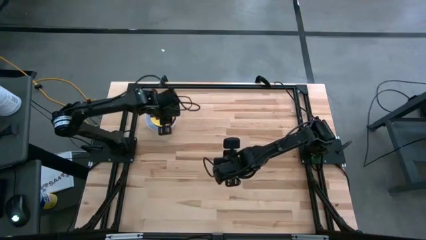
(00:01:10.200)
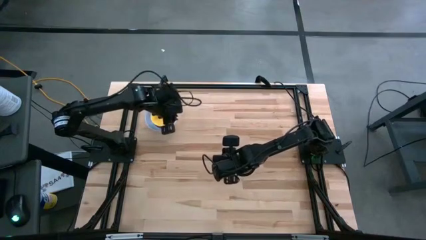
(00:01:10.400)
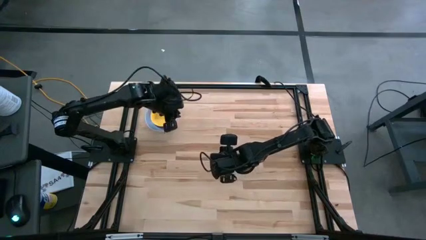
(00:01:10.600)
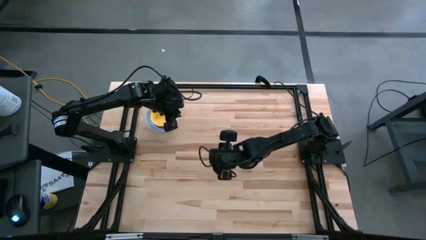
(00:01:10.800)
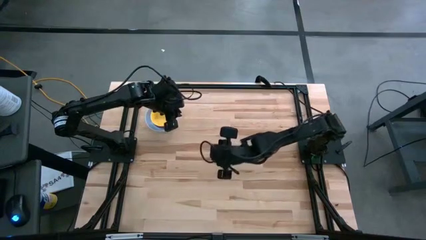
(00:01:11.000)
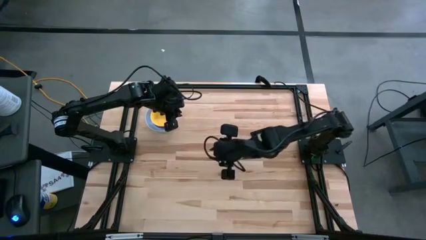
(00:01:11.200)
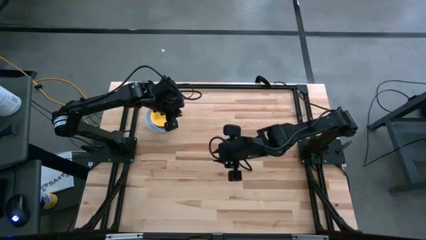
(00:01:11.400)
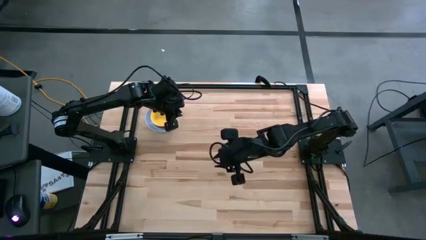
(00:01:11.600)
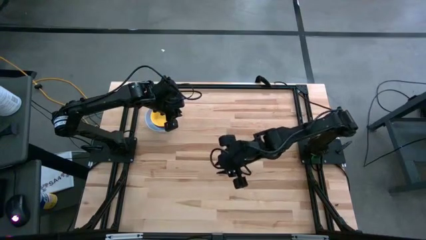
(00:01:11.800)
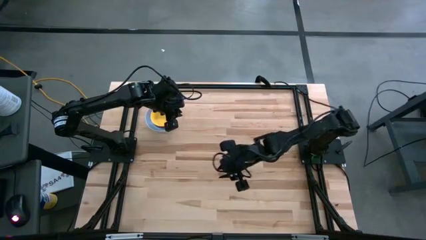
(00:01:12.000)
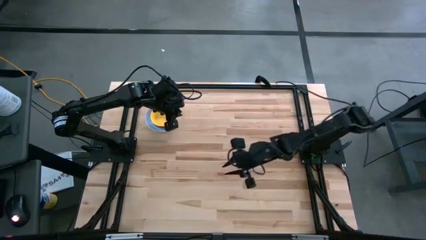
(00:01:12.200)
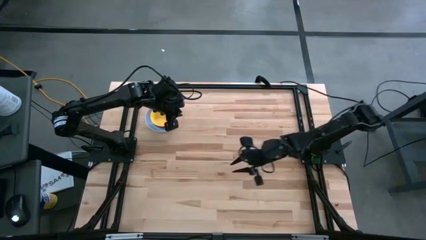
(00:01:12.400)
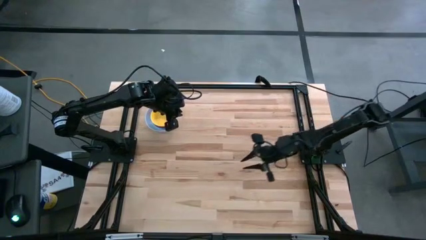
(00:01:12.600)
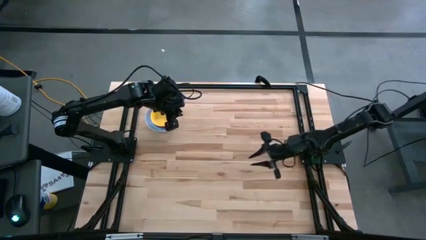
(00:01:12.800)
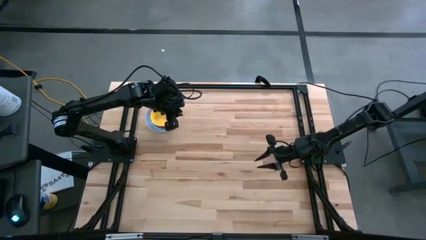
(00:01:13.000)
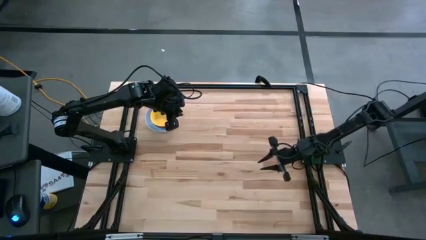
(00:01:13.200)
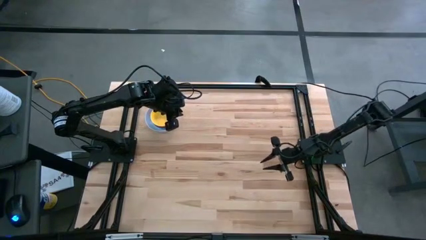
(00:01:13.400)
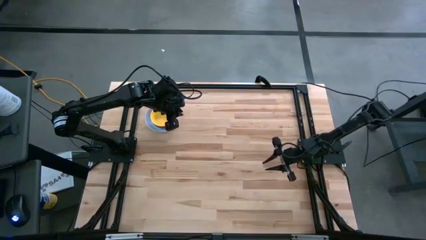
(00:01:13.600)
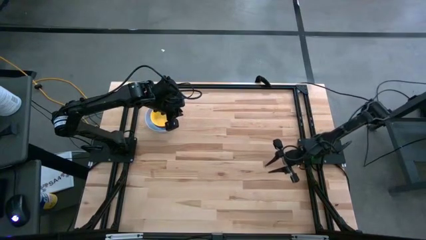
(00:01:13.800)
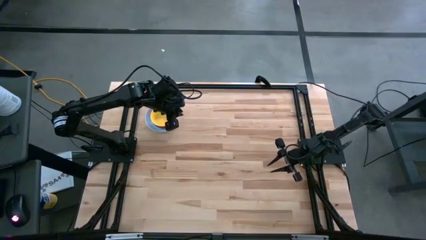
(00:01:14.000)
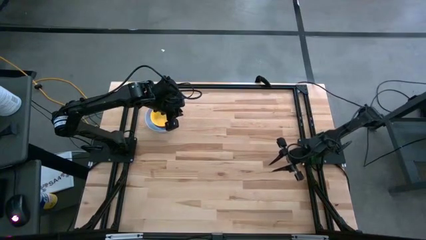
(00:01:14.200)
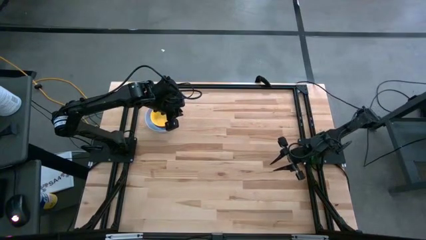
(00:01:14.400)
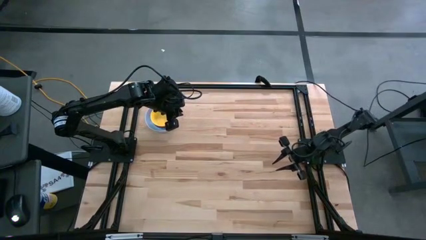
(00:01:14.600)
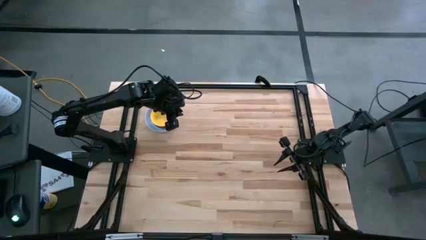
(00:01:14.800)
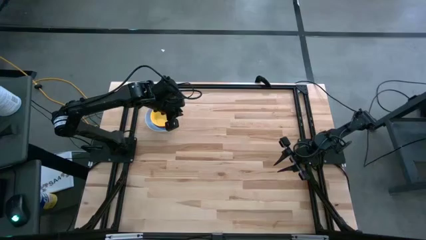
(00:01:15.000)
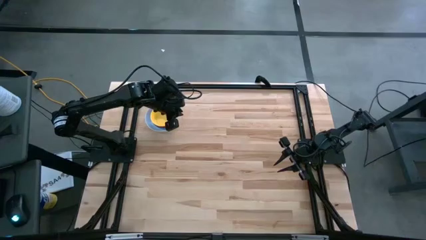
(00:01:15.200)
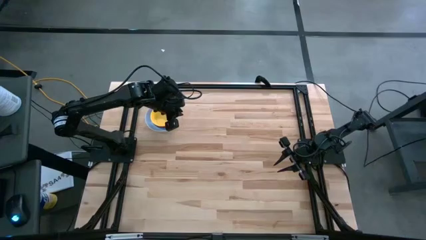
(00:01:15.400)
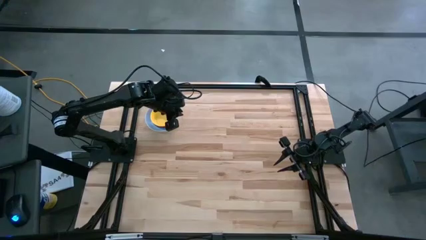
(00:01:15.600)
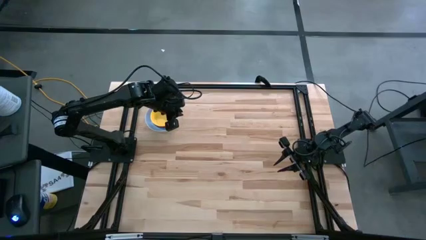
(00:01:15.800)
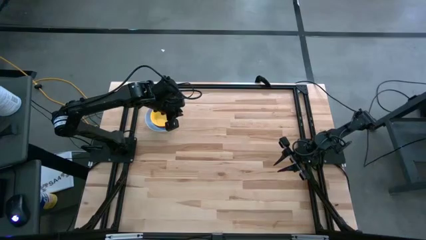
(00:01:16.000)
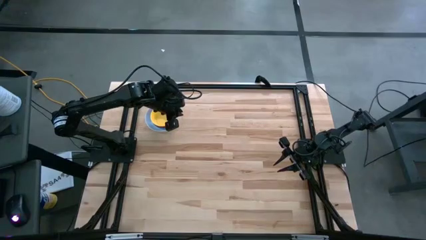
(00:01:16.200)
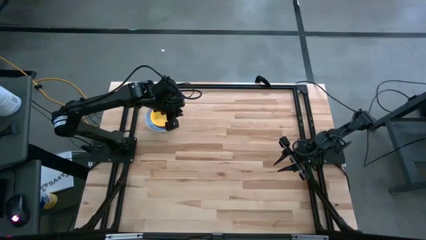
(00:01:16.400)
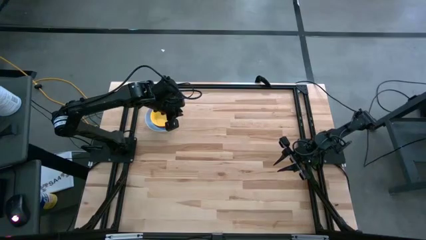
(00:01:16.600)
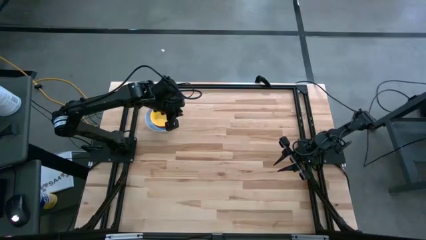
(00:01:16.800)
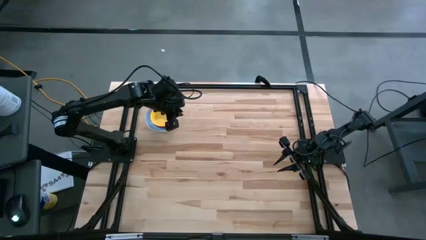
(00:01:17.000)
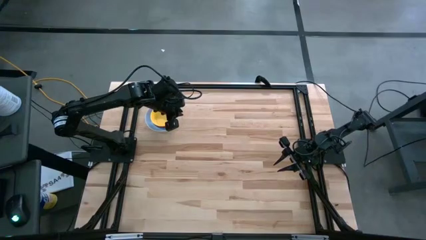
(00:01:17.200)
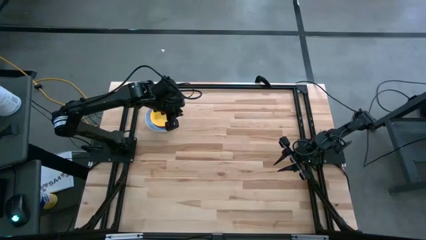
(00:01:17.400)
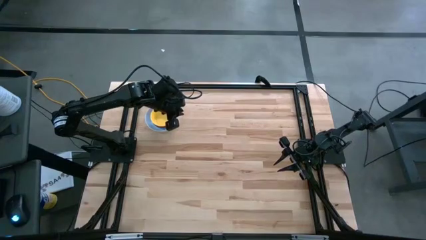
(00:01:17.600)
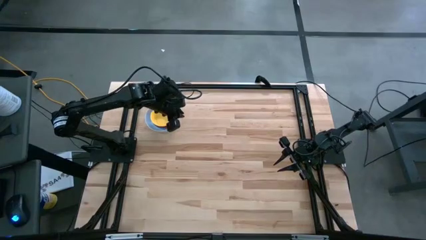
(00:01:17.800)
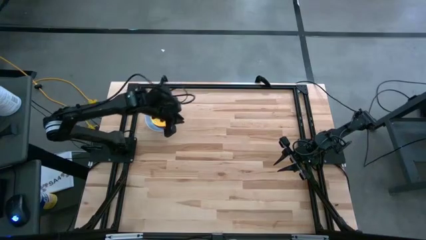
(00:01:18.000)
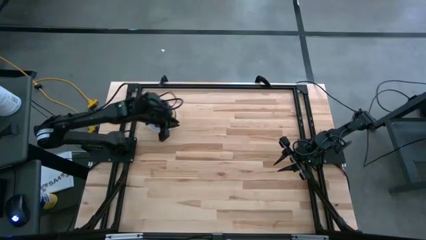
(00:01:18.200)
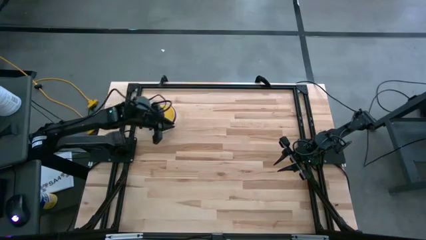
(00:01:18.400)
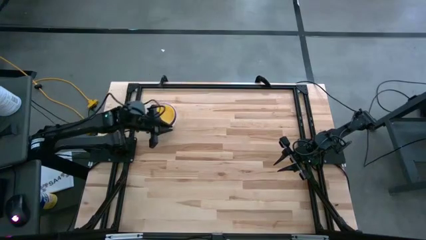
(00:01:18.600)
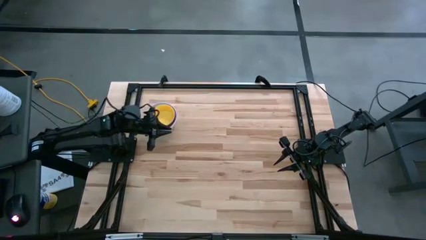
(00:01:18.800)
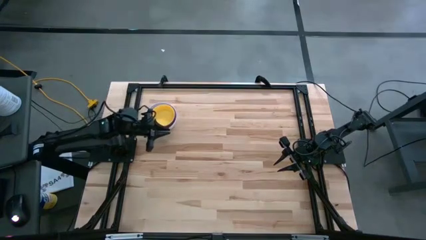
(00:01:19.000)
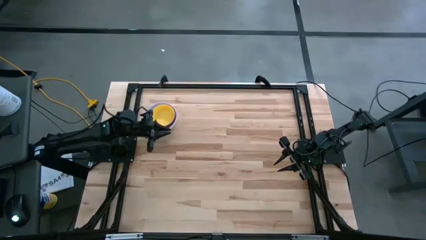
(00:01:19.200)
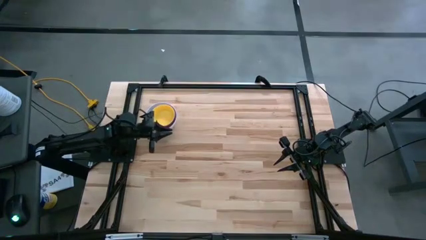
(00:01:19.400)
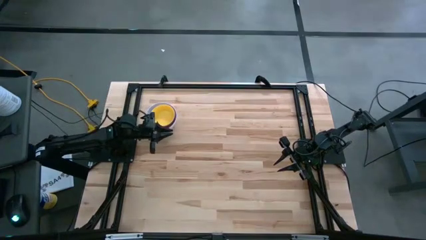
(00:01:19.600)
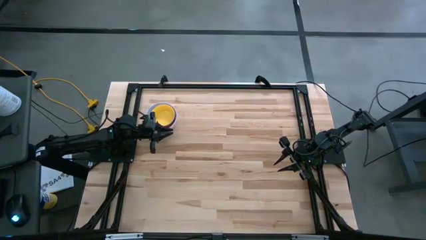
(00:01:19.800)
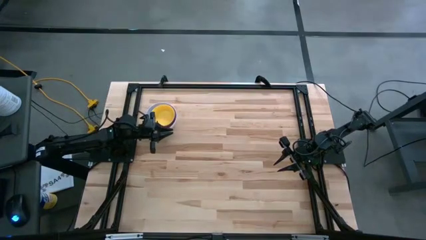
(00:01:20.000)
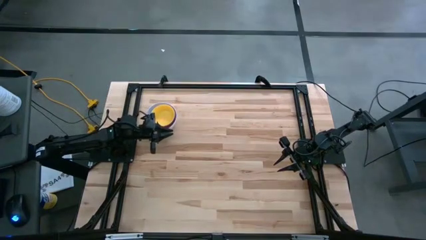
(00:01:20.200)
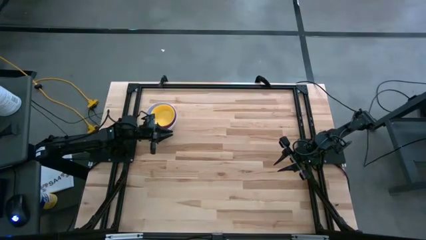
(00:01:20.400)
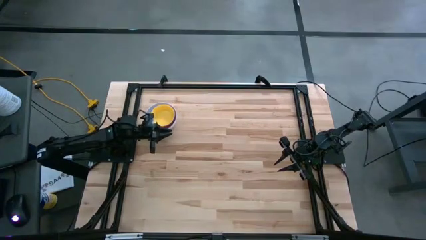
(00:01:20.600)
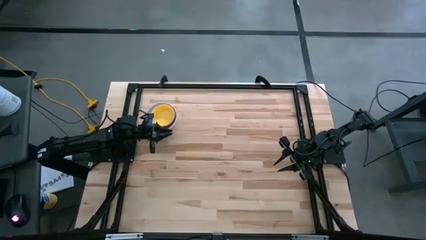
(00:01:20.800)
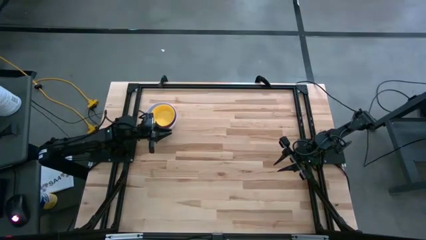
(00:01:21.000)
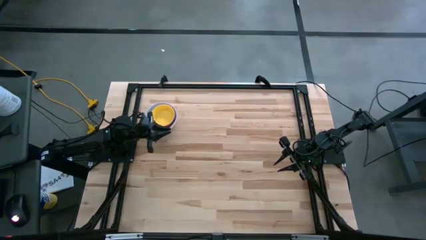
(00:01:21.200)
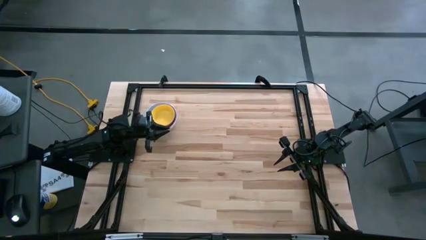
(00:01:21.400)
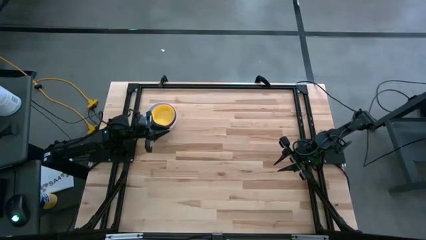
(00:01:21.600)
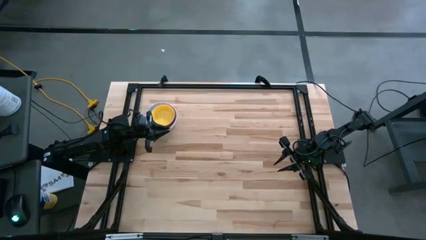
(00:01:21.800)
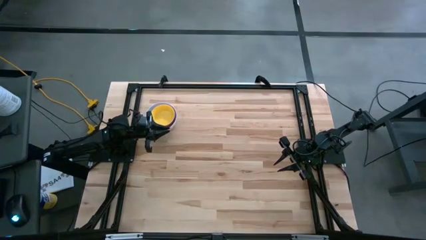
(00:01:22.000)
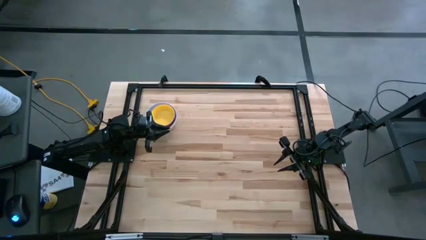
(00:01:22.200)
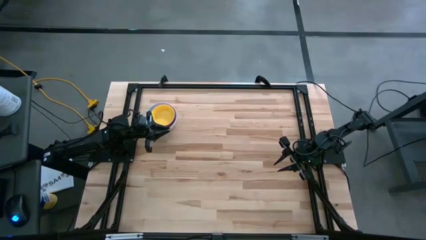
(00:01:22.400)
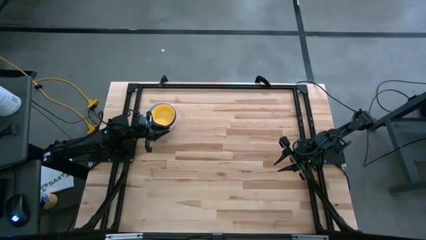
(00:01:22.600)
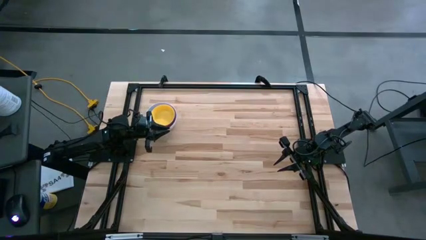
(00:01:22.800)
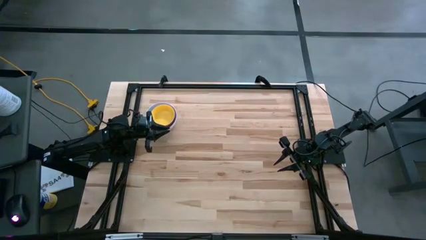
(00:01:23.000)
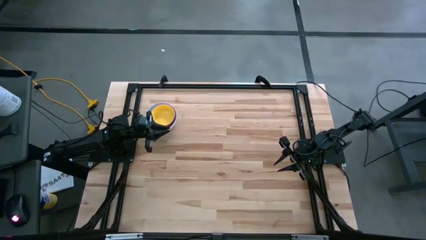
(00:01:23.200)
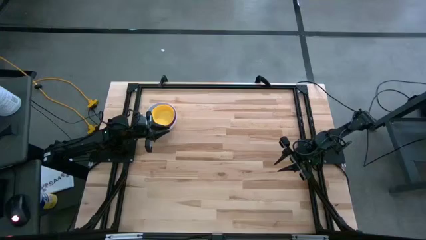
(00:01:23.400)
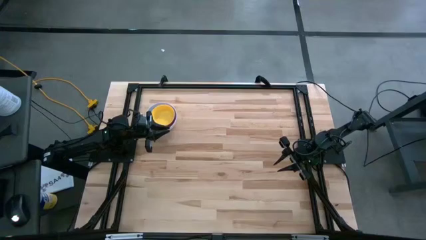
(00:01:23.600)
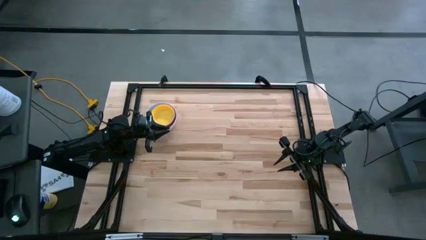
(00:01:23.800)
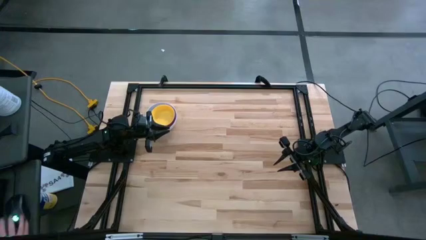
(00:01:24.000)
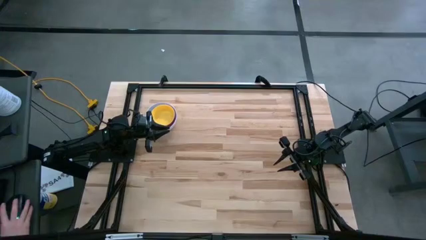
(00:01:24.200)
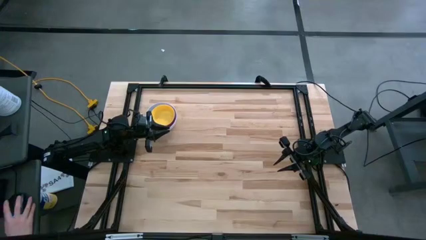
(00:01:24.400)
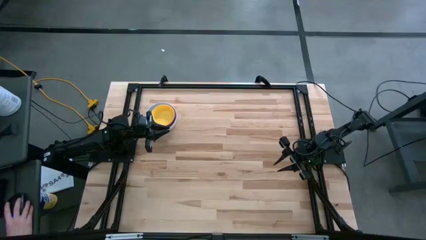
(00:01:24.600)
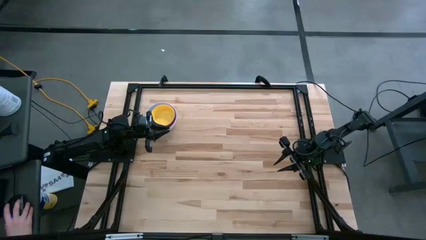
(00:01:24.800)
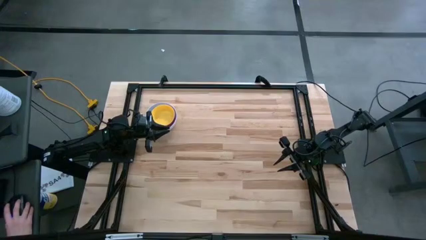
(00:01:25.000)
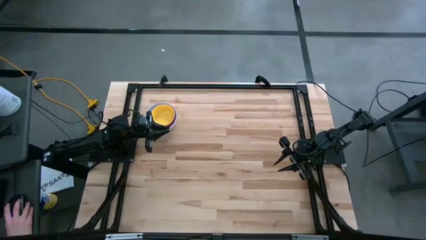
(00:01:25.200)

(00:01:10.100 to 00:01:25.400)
Return to Home Position
